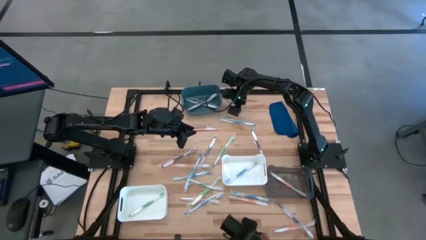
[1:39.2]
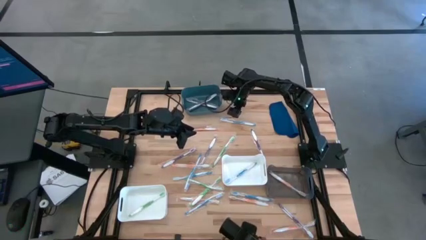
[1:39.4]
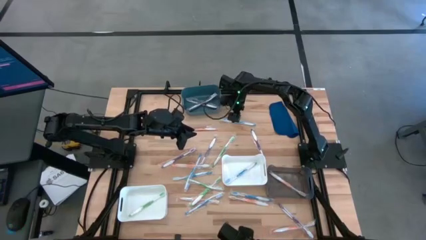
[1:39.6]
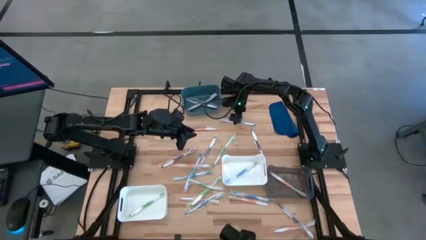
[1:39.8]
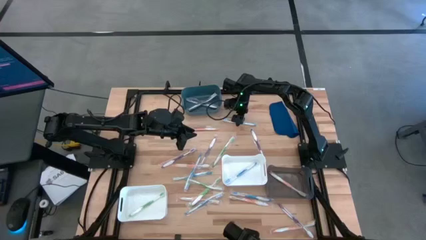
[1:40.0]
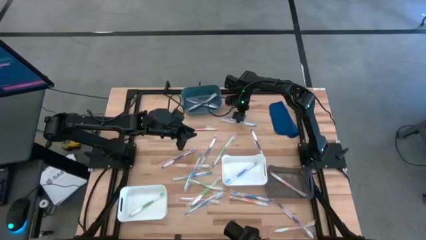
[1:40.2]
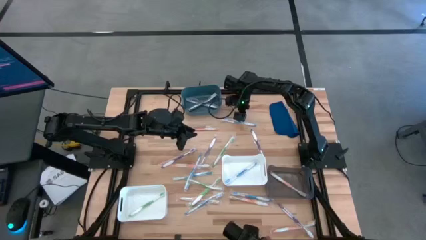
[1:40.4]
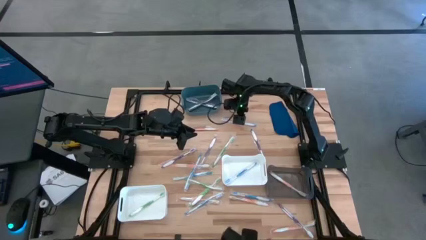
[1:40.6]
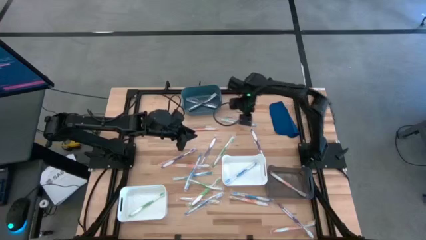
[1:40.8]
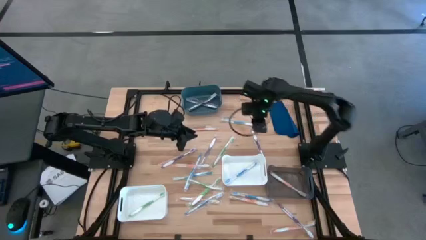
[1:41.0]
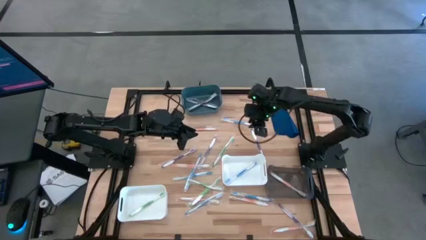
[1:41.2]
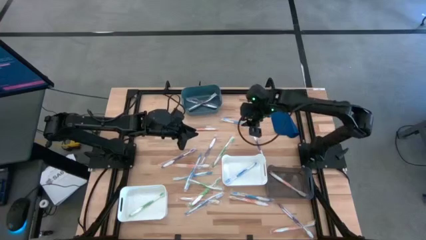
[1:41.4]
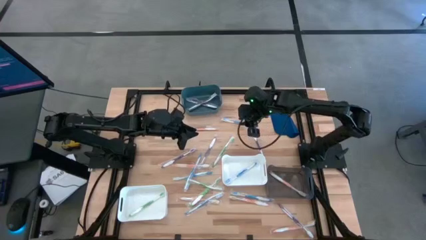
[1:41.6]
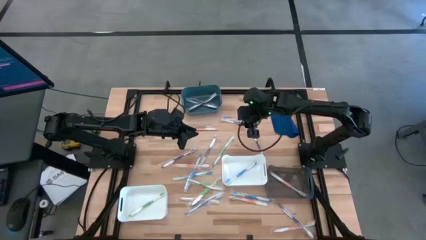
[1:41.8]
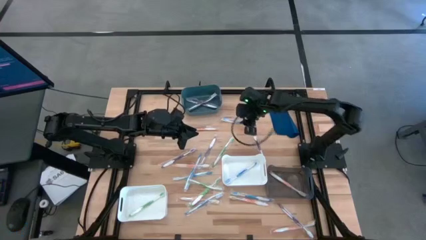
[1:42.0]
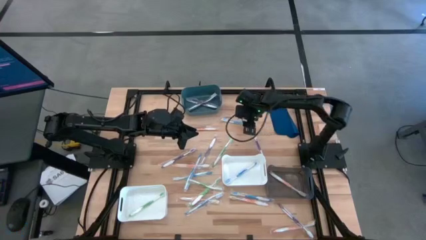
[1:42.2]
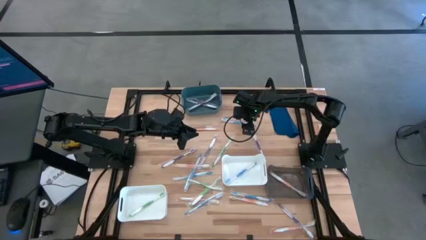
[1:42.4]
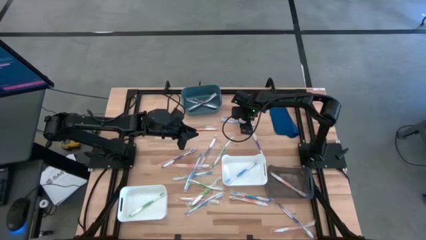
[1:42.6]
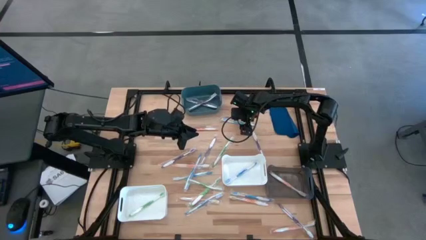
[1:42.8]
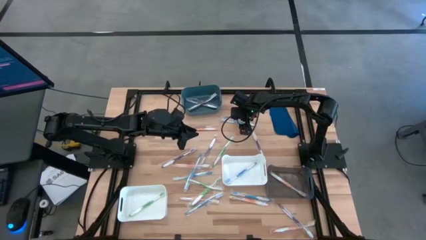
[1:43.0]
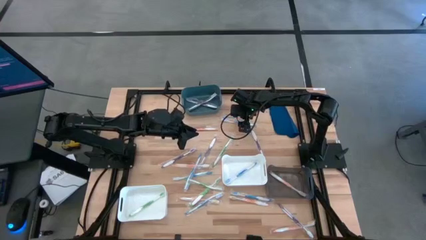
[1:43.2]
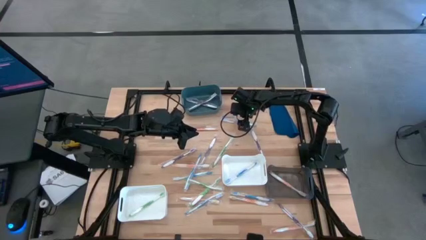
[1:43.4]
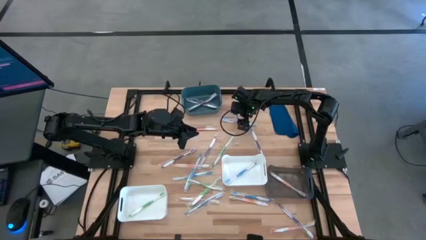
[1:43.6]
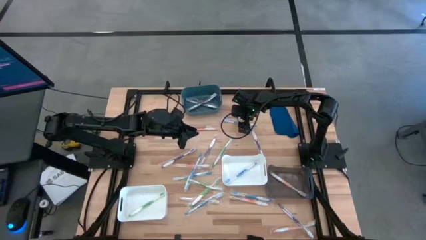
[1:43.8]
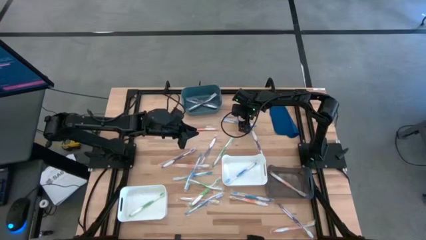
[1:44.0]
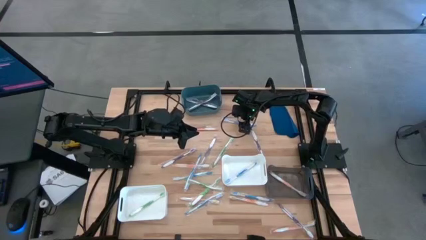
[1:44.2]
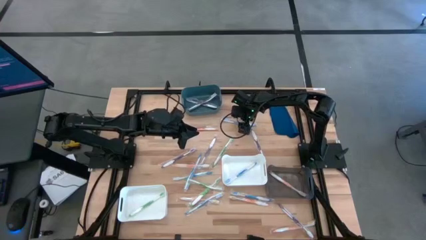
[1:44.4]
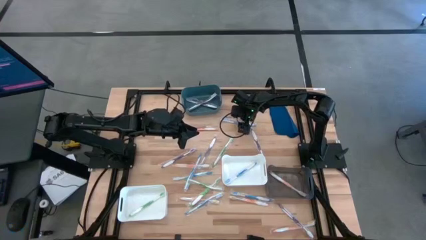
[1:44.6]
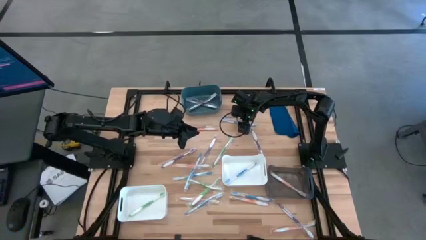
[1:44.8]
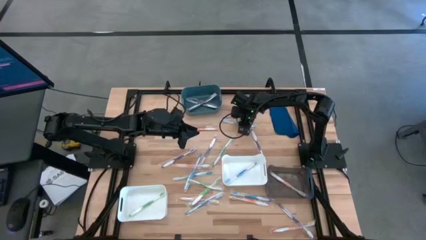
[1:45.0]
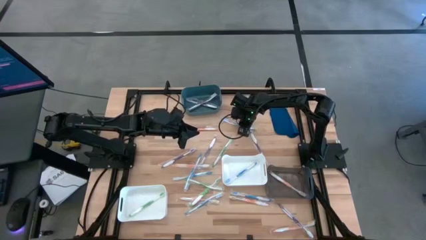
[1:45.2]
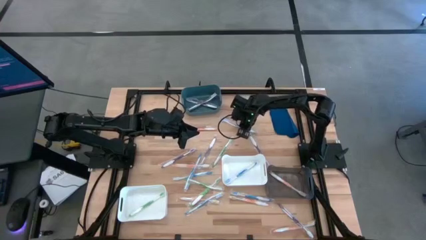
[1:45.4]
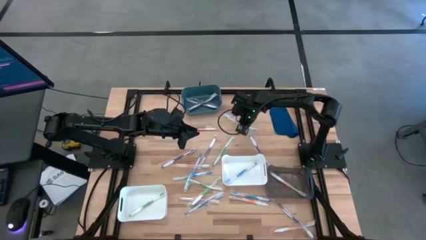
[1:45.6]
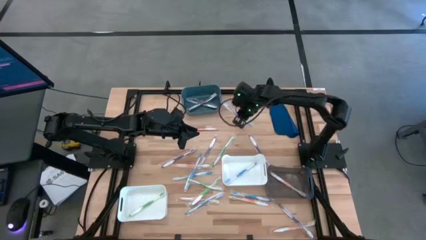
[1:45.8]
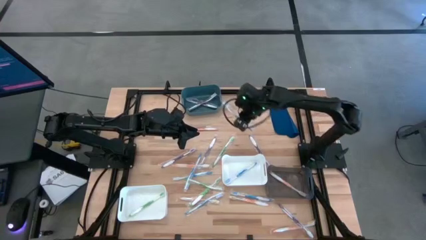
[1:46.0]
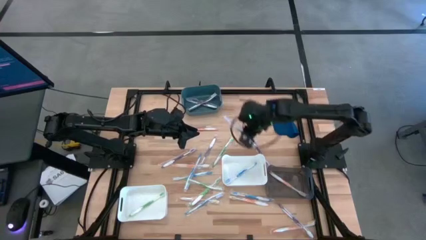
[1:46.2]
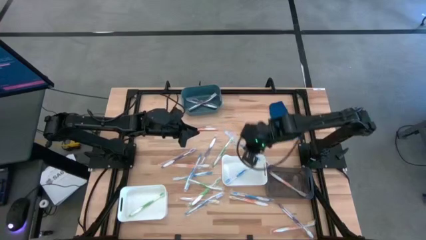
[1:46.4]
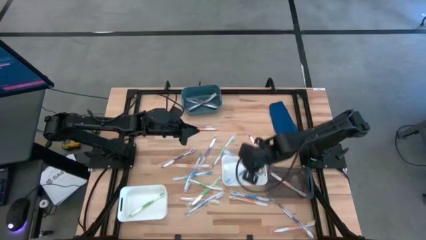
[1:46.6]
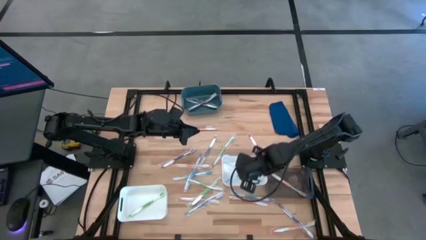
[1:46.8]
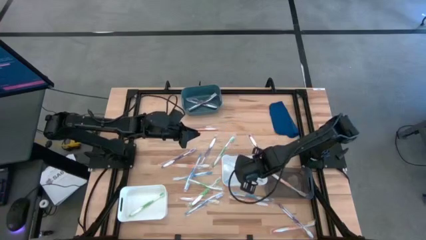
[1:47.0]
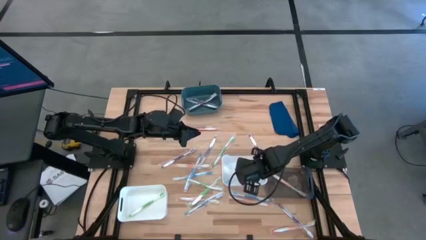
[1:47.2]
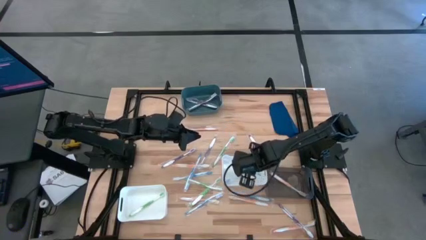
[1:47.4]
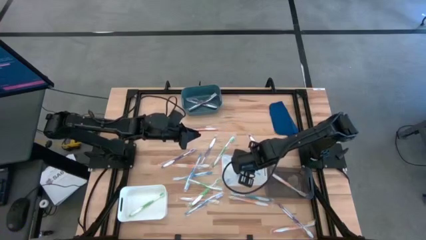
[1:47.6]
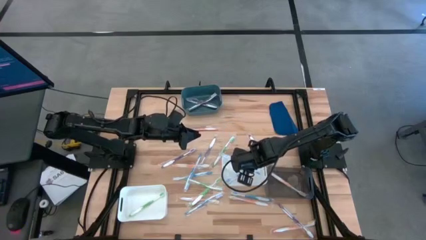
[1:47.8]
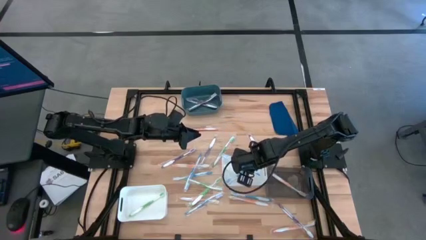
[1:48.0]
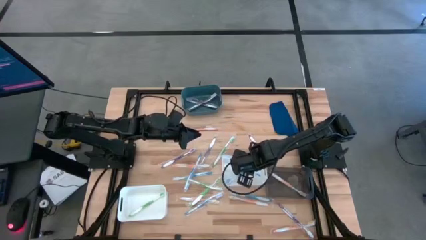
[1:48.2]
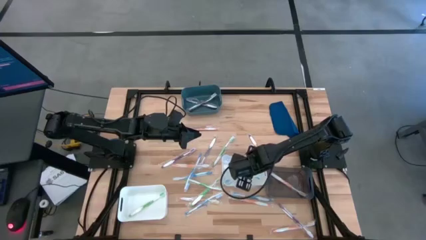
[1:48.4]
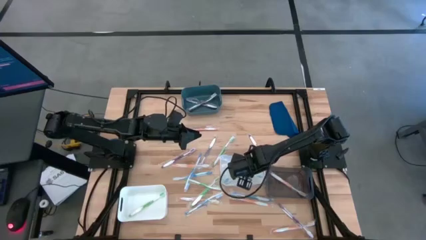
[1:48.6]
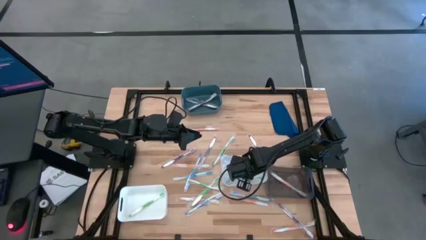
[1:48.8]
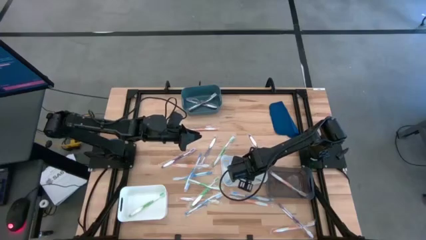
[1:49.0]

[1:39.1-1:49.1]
Task: Pick & Place Toothbrushes
Put the blue toothbrush into the top white bin

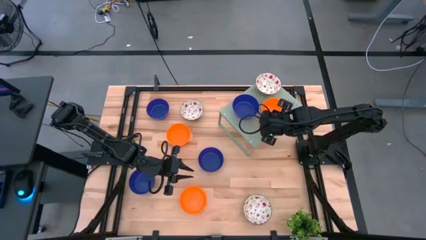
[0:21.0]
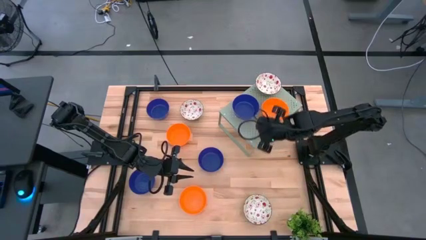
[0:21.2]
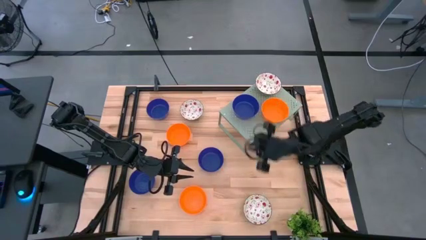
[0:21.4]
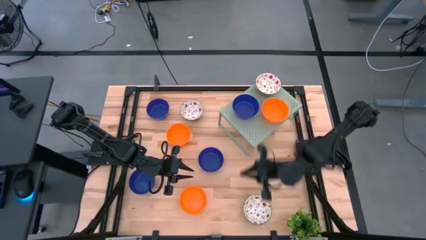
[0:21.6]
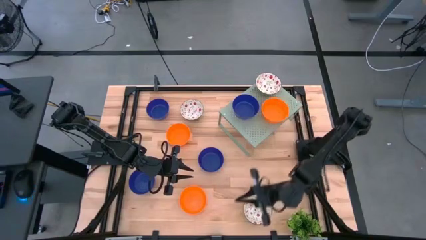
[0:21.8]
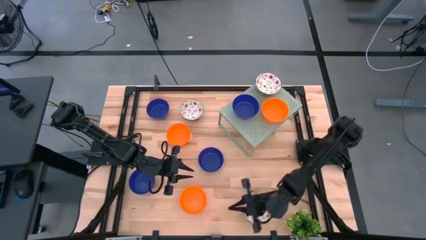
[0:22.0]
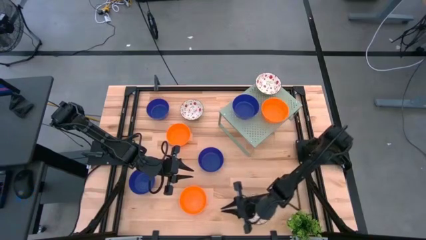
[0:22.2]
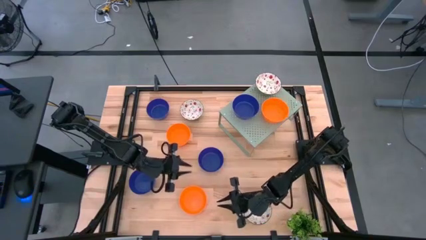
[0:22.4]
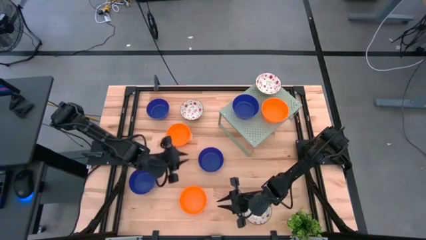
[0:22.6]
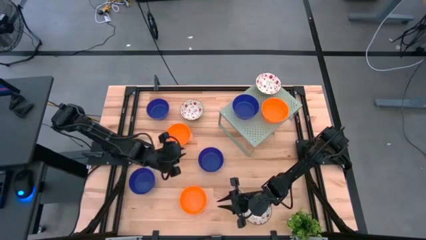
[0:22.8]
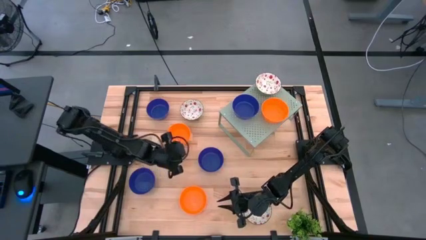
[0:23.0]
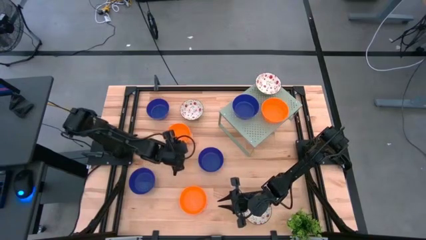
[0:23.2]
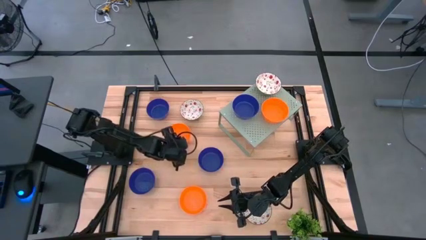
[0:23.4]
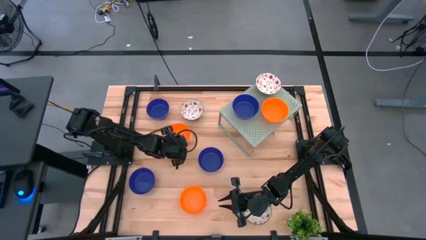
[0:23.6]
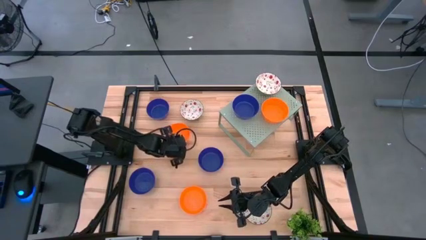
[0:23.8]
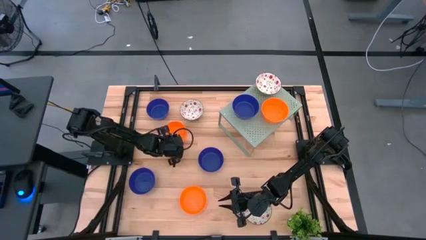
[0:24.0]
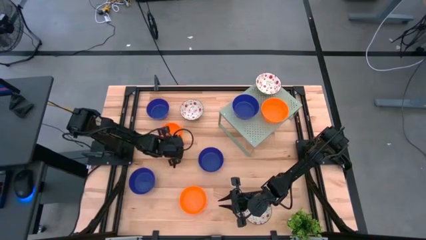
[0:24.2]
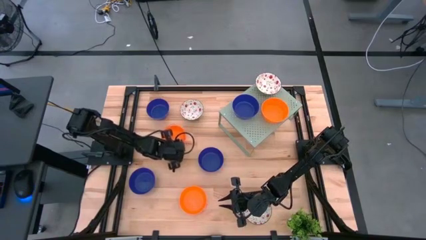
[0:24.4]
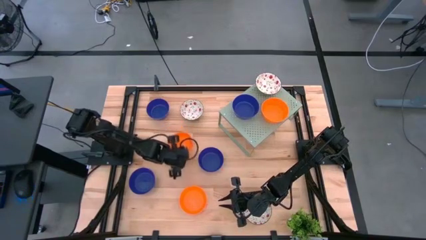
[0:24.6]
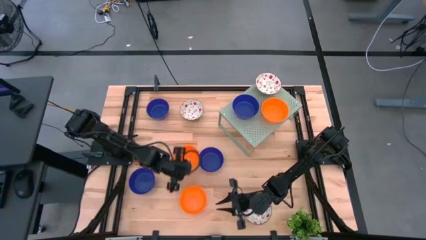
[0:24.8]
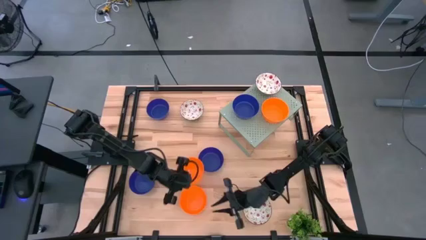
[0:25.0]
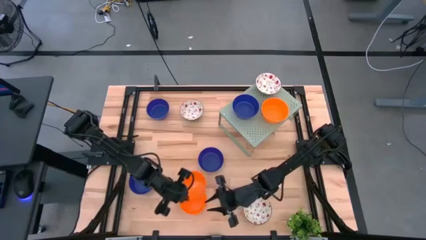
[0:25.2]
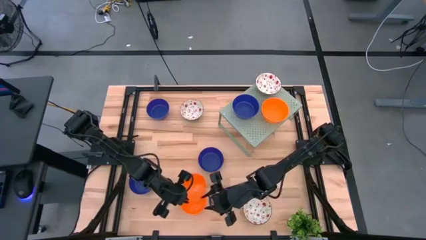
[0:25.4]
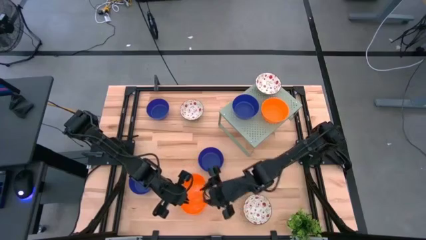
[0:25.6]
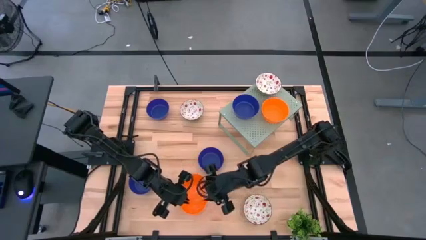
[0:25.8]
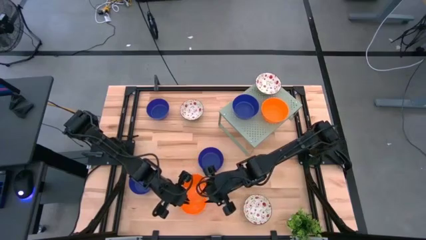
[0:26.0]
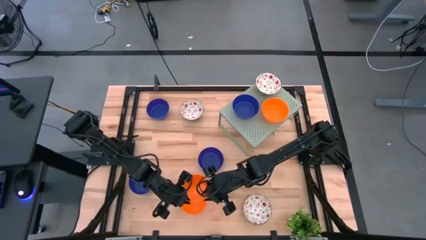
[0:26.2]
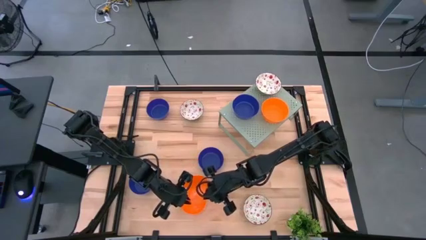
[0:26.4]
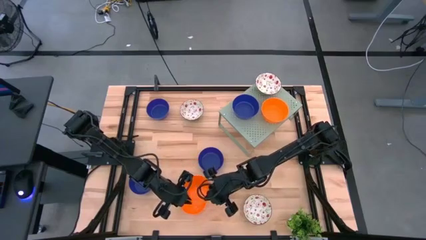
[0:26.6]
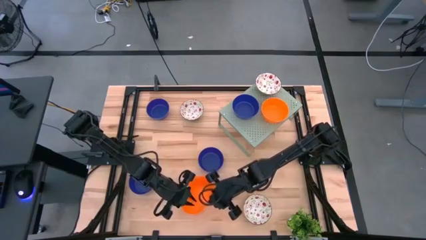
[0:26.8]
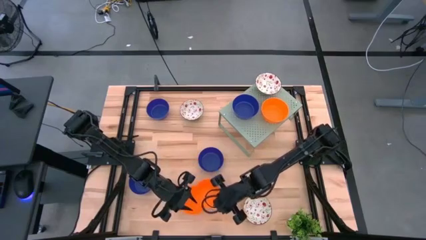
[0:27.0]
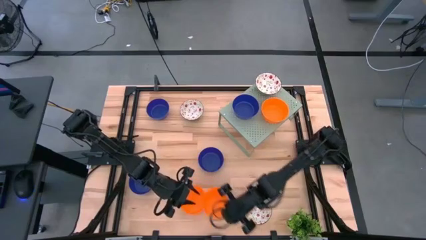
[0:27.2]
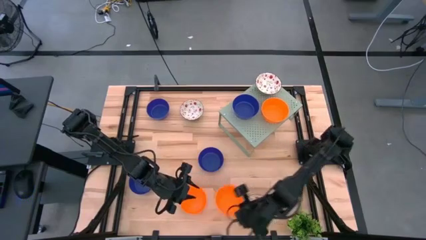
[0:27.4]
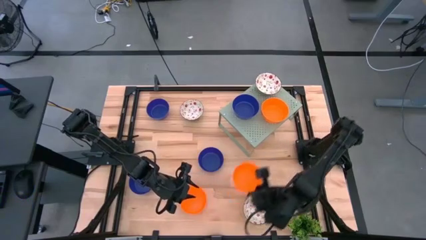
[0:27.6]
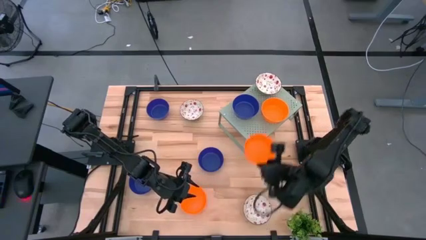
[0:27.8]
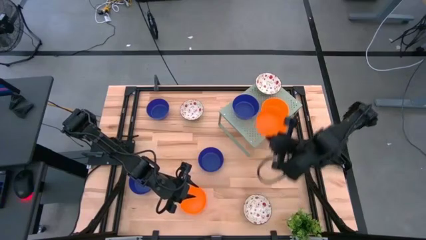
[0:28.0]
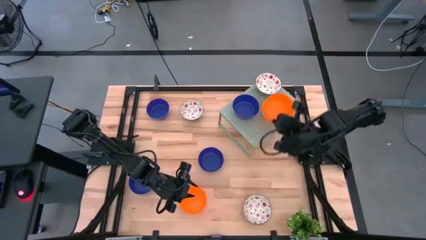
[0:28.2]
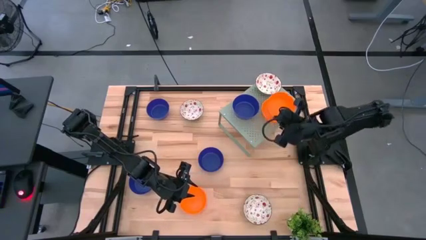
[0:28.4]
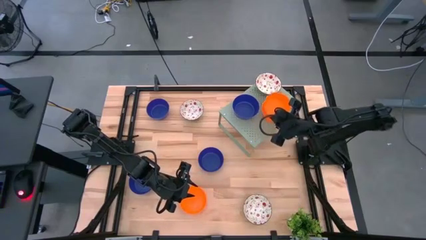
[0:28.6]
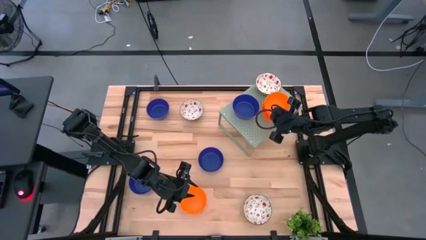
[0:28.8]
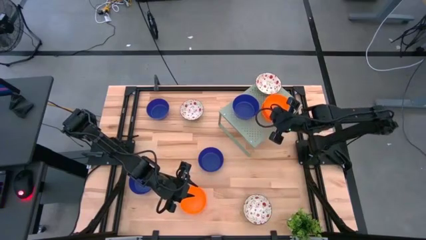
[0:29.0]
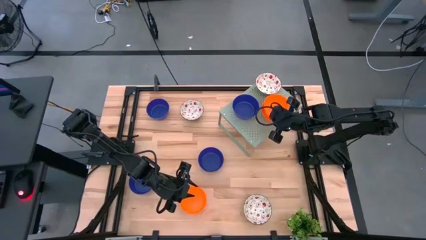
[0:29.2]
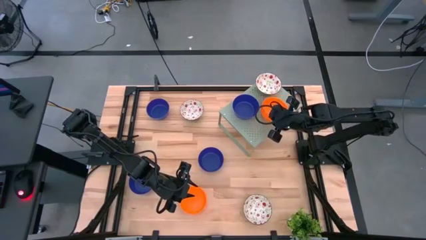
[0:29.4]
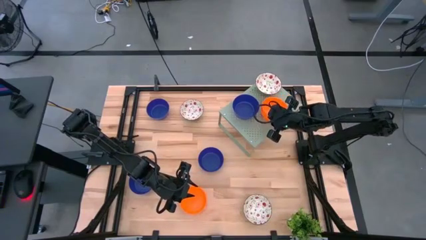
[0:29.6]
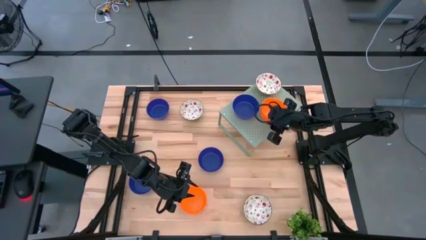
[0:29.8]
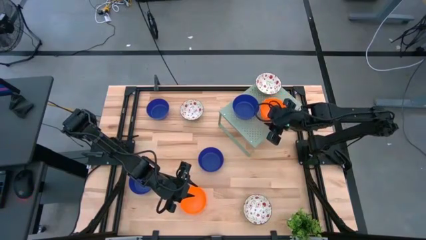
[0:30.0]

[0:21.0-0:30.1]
Task: Pick & Place Mini bowls
Stack the orange bowl on the orange bowl on the shelf
